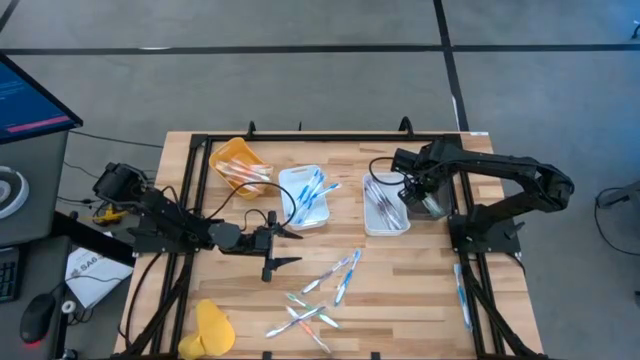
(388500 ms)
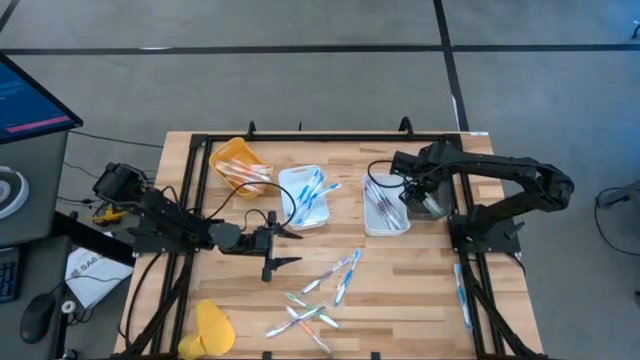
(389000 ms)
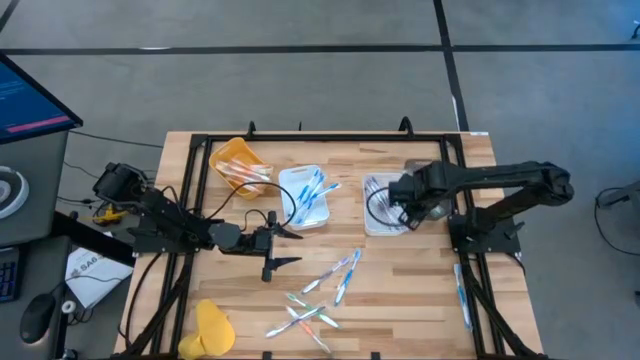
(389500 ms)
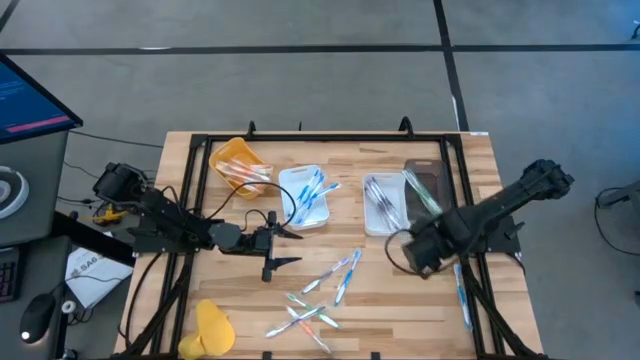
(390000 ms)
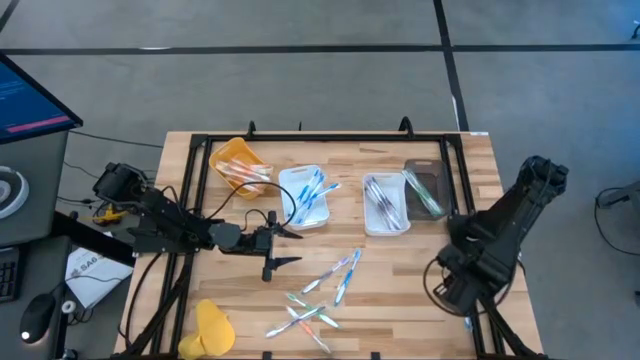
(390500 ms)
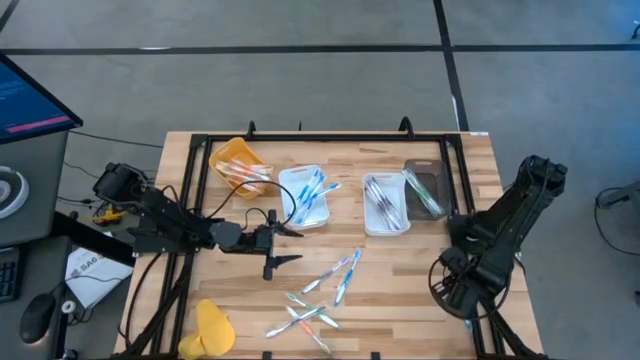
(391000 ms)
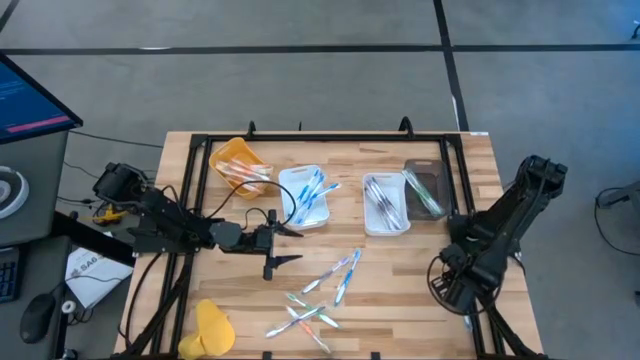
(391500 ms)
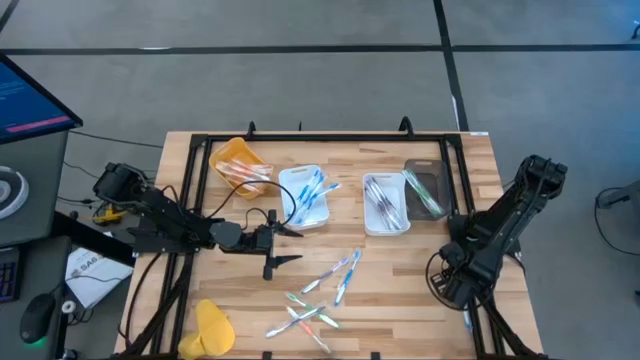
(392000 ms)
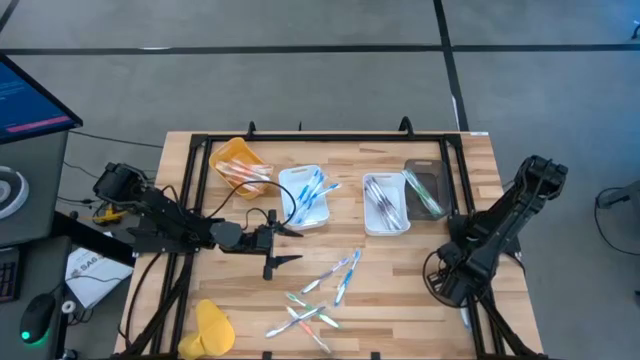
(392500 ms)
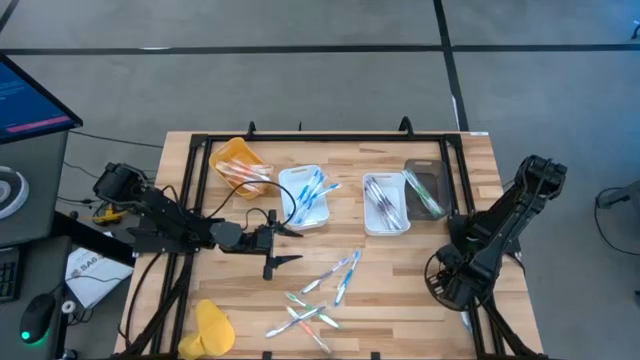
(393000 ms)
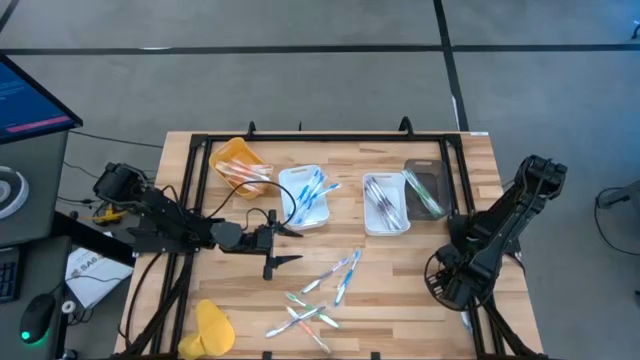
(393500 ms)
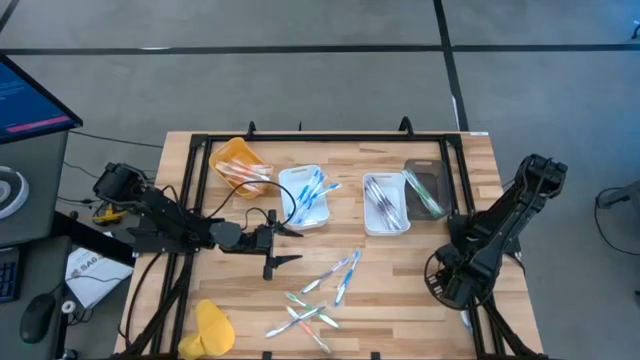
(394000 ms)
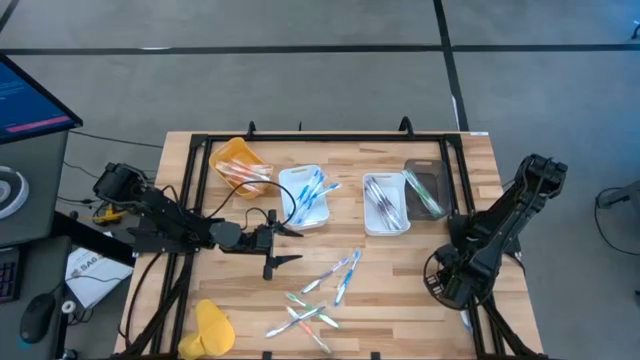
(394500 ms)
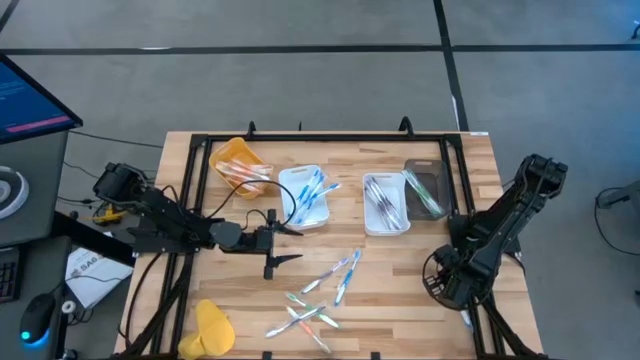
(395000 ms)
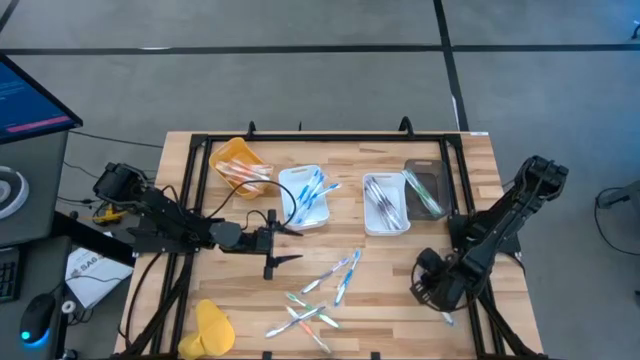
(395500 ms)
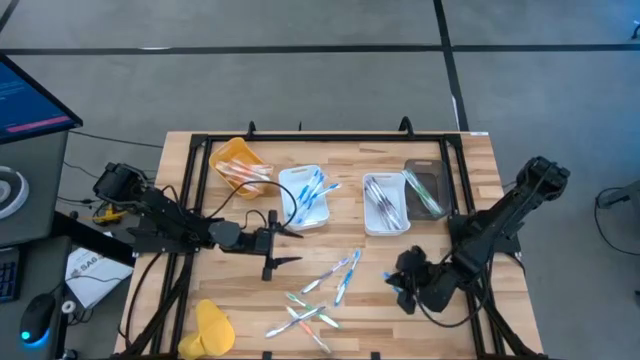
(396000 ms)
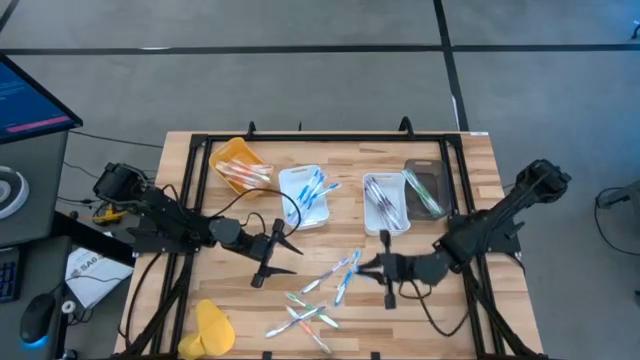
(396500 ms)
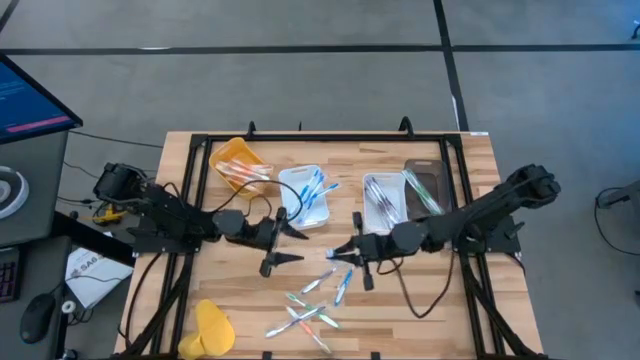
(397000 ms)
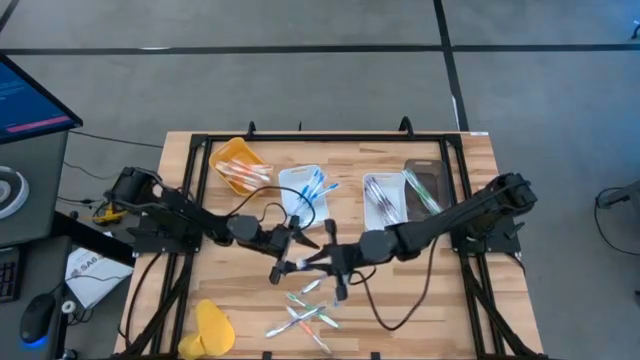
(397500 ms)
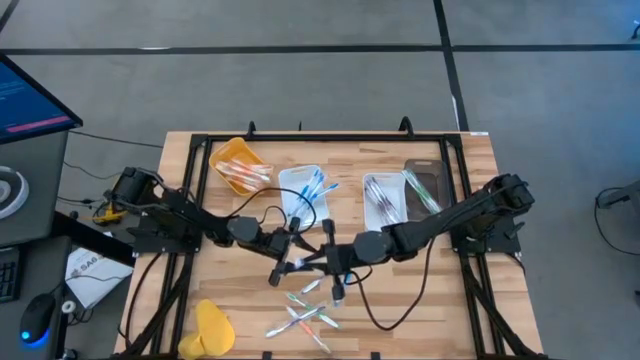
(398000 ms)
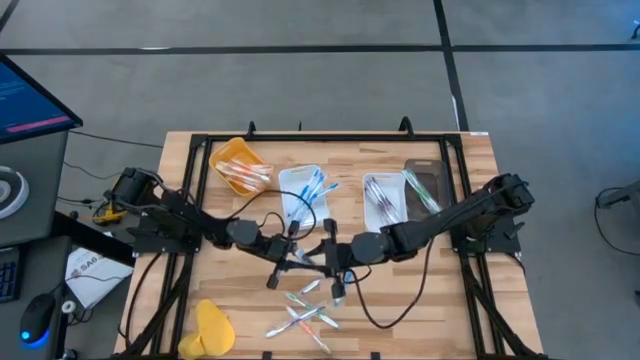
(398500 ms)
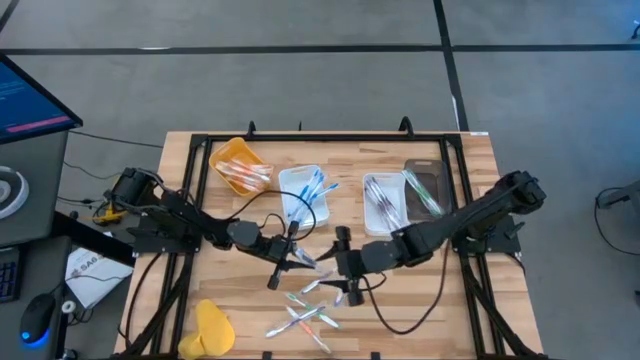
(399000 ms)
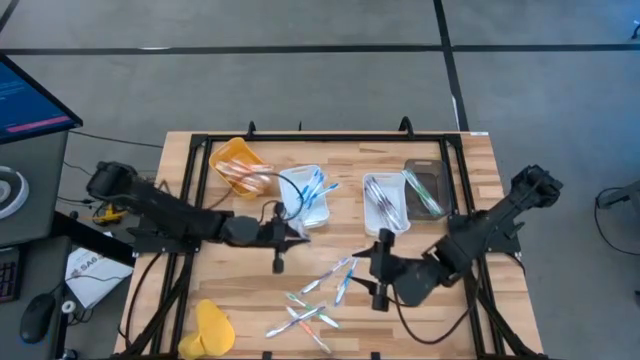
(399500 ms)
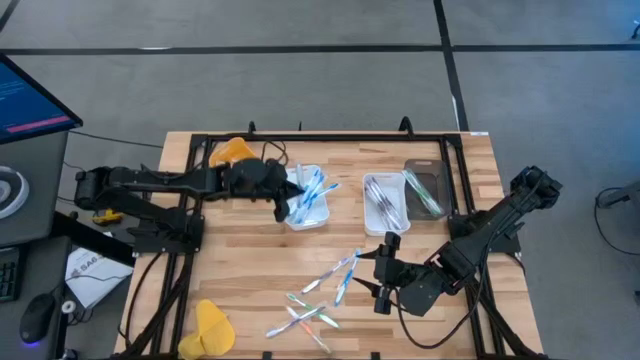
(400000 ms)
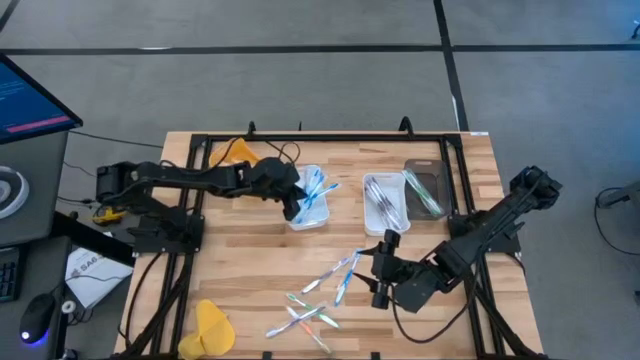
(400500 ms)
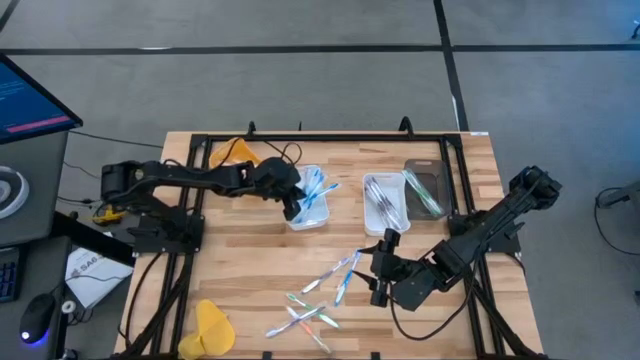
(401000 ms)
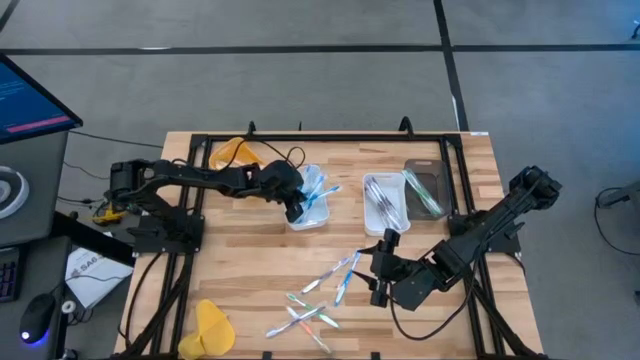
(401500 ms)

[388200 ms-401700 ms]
Task: Pick & Place Toothbrushes
Put the right blue toothbrush into the left white bin

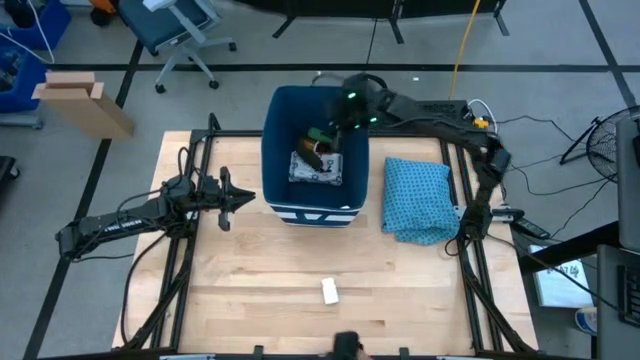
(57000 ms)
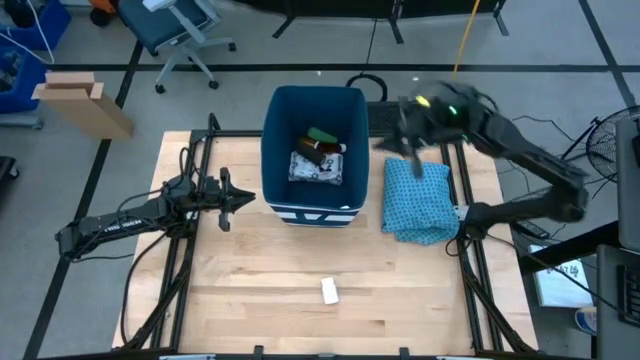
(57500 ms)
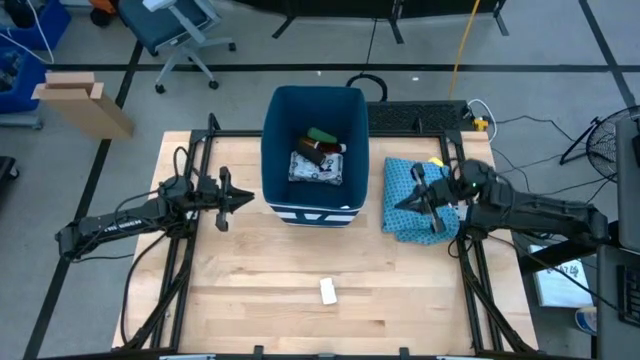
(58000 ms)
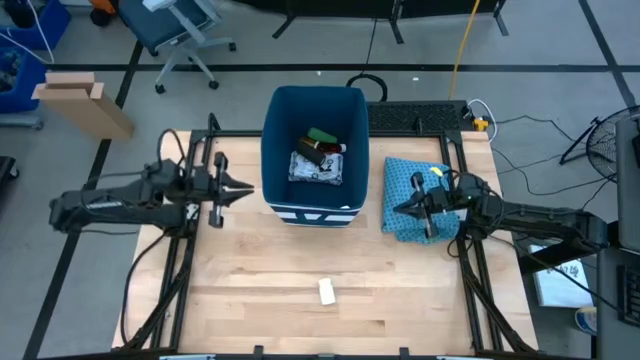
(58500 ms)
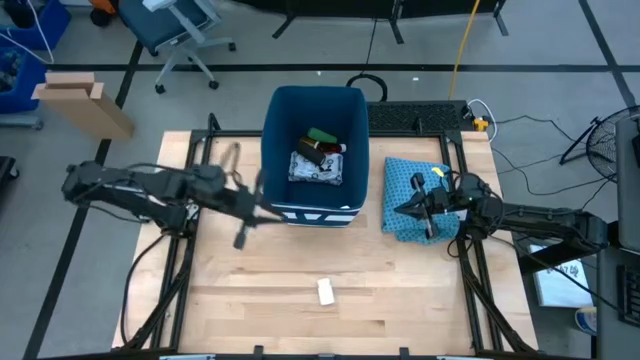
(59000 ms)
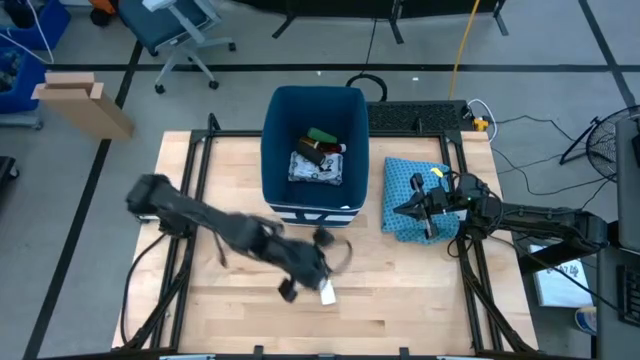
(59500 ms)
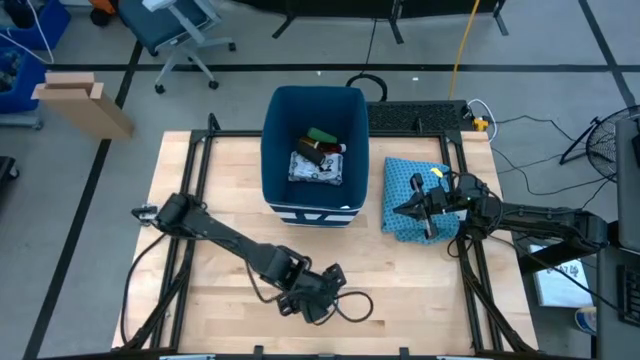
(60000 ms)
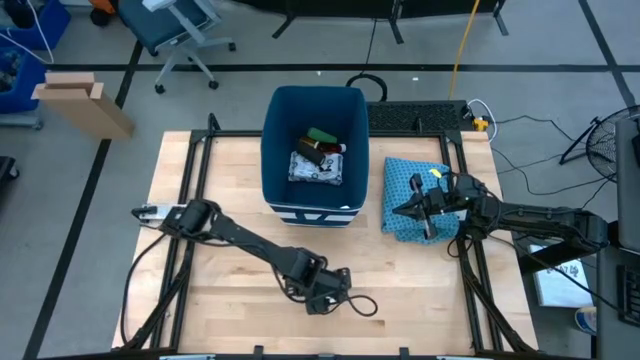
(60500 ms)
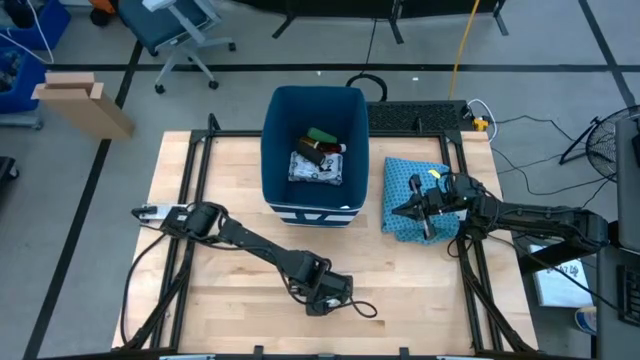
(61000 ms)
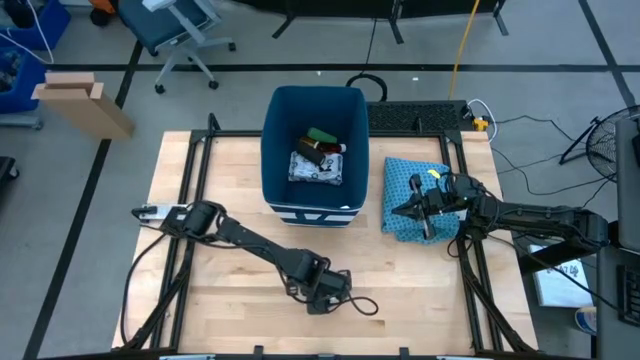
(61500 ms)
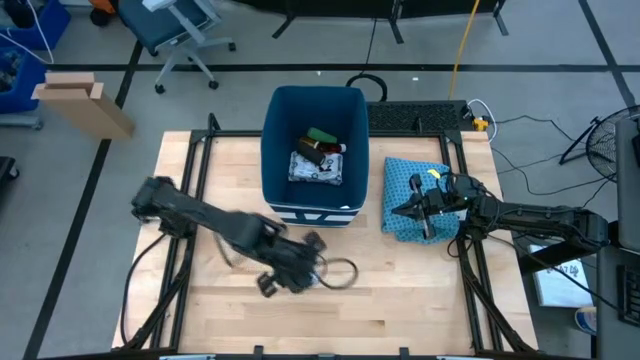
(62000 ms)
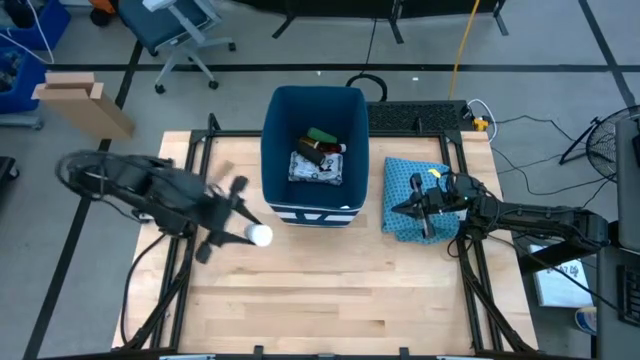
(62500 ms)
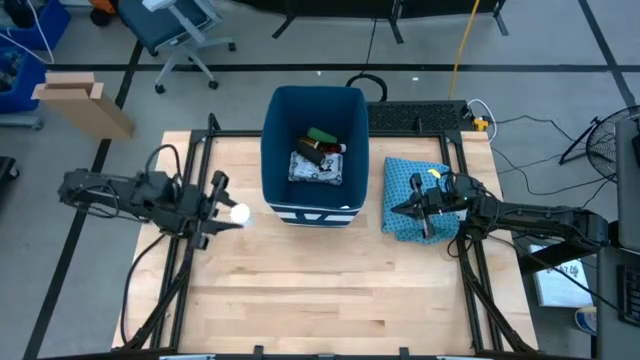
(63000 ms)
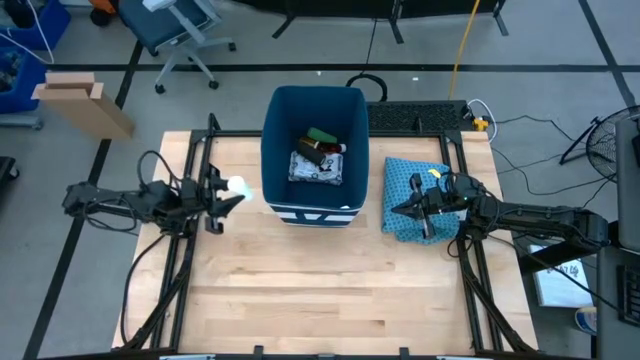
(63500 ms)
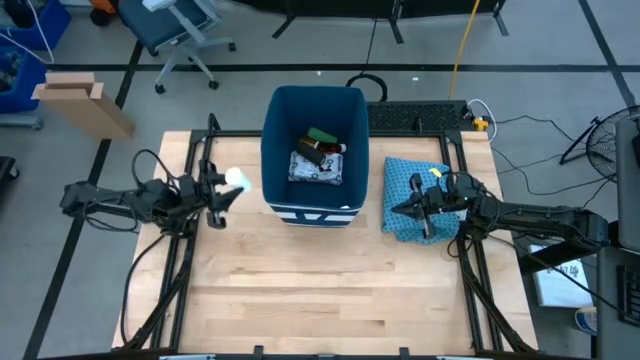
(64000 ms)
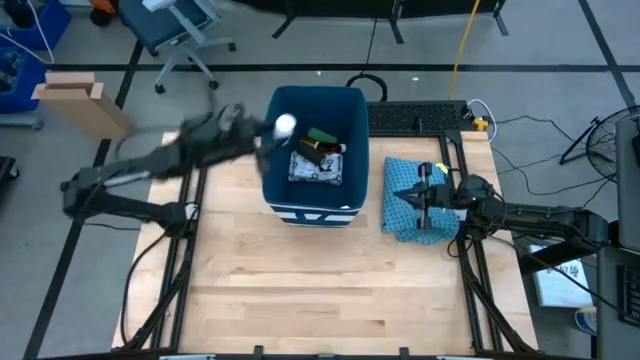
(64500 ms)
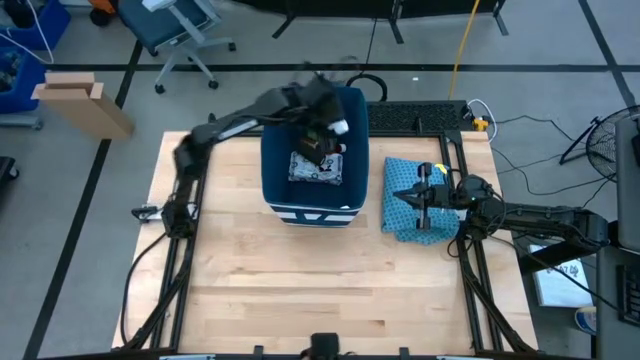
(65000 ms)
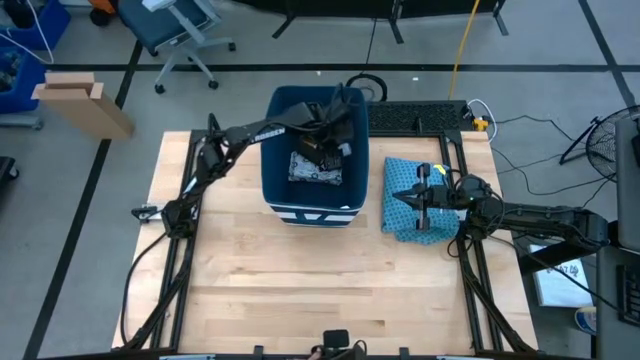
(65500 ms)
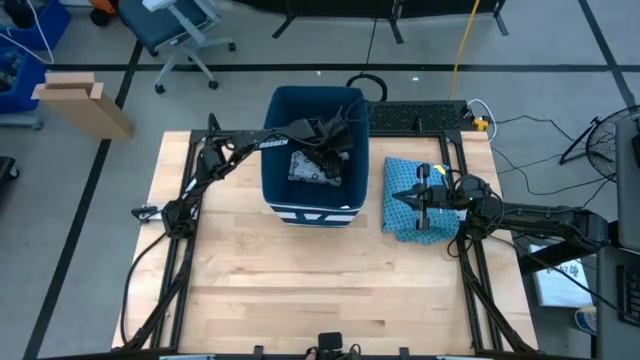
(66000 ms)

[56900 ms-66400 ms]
Task: Pick & place medical supplies in basket/bin
Put the white pill bottle into the blue bin
